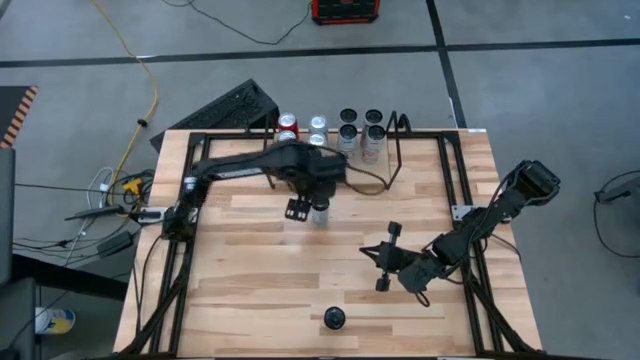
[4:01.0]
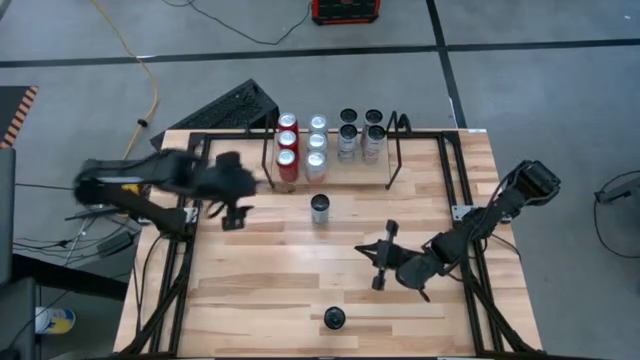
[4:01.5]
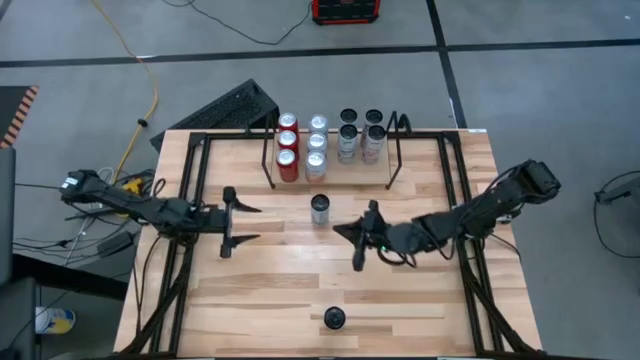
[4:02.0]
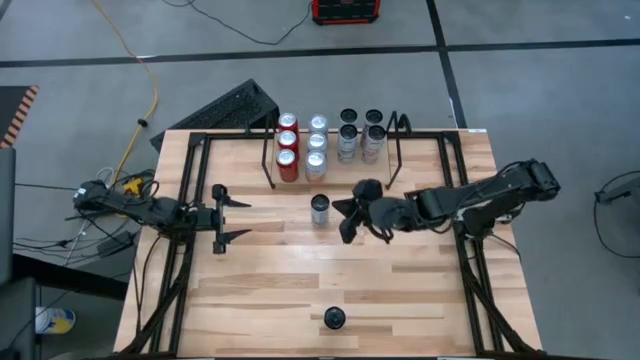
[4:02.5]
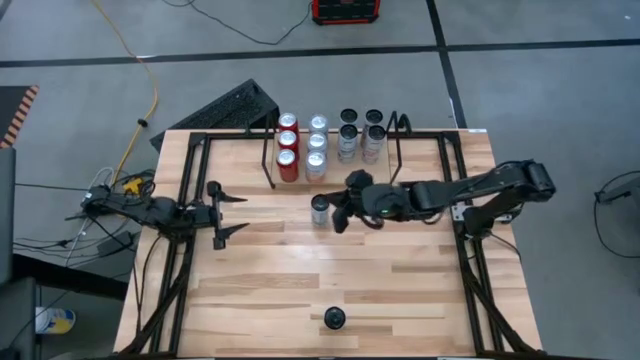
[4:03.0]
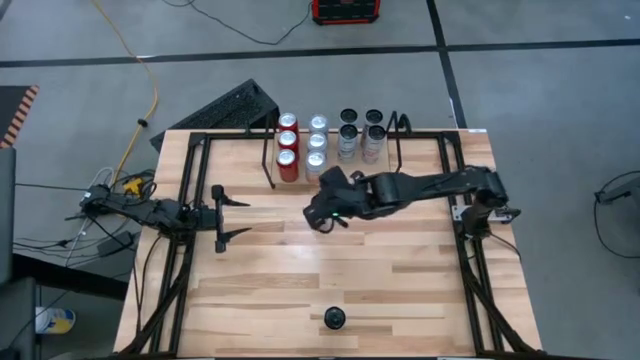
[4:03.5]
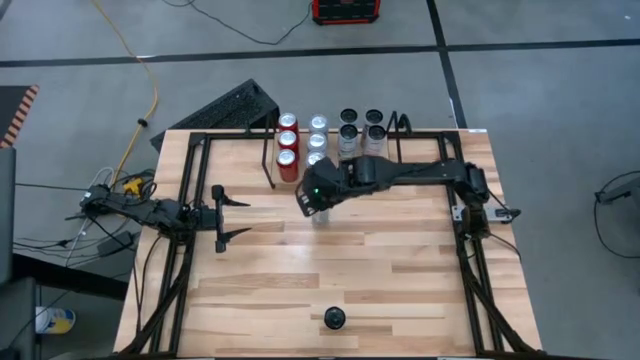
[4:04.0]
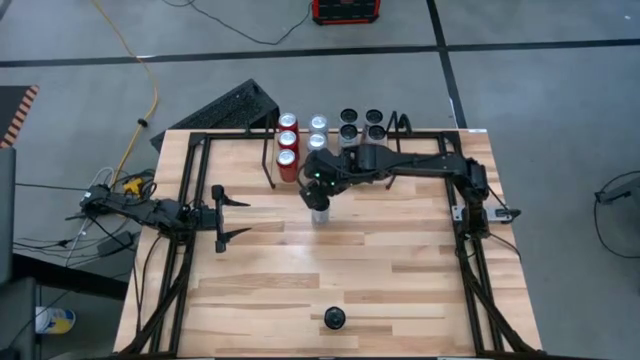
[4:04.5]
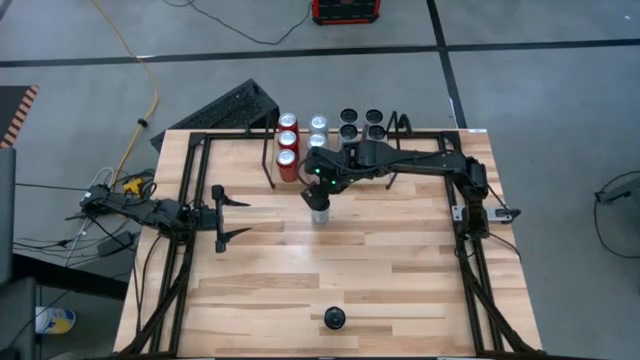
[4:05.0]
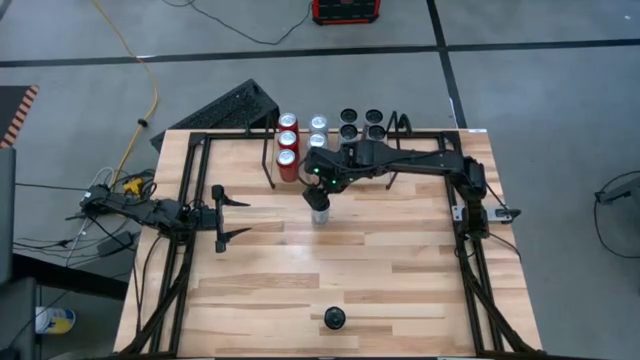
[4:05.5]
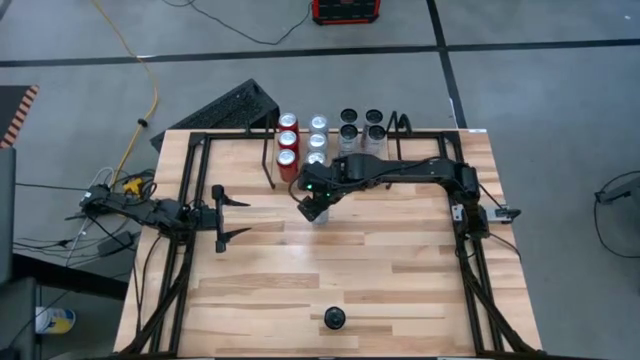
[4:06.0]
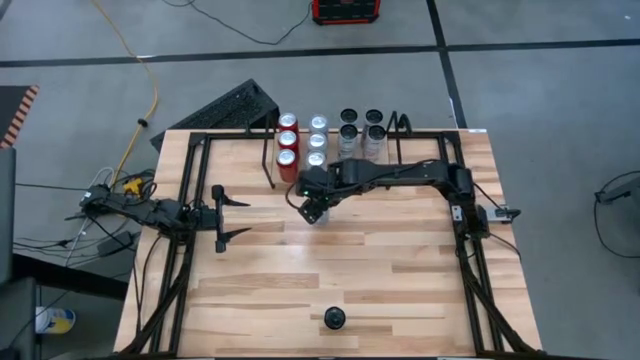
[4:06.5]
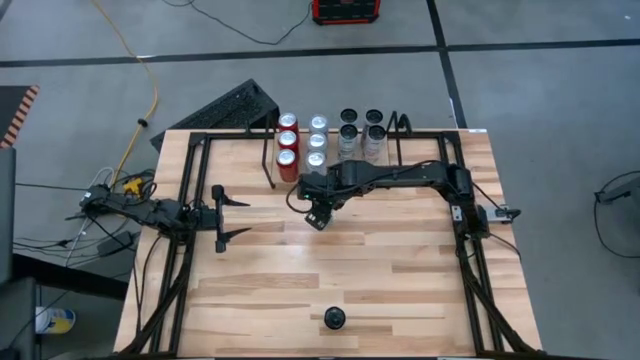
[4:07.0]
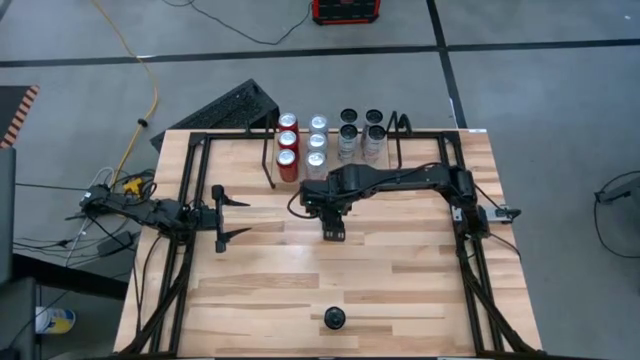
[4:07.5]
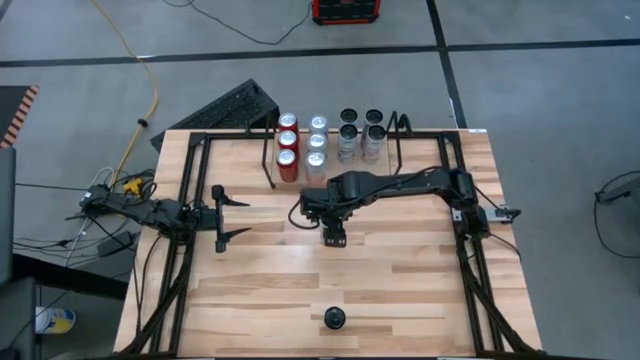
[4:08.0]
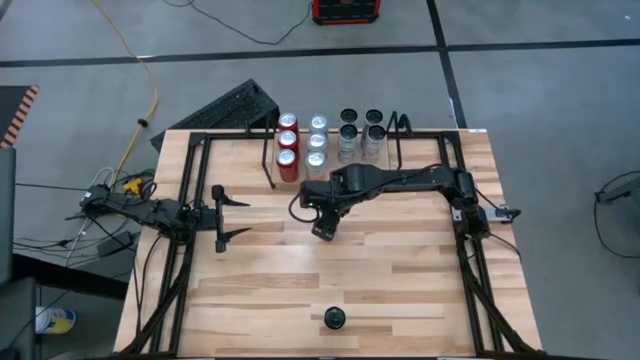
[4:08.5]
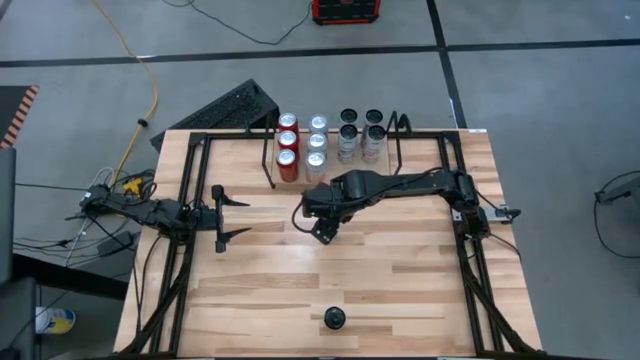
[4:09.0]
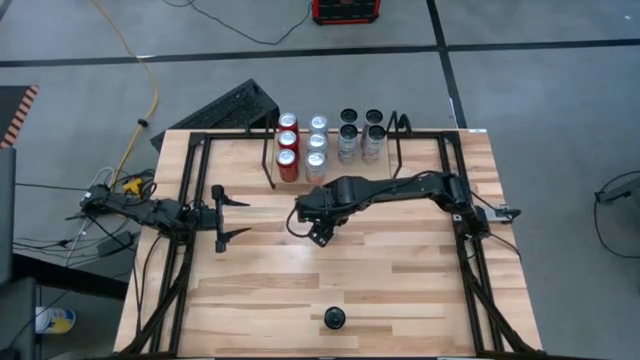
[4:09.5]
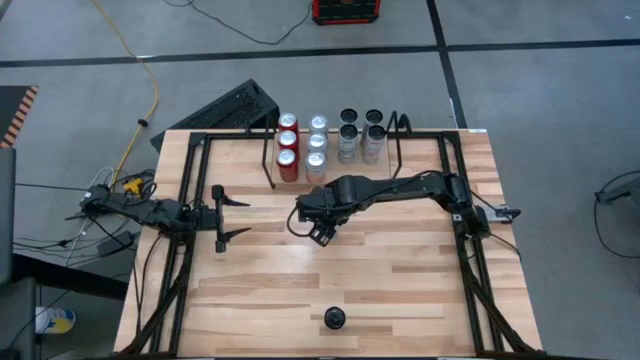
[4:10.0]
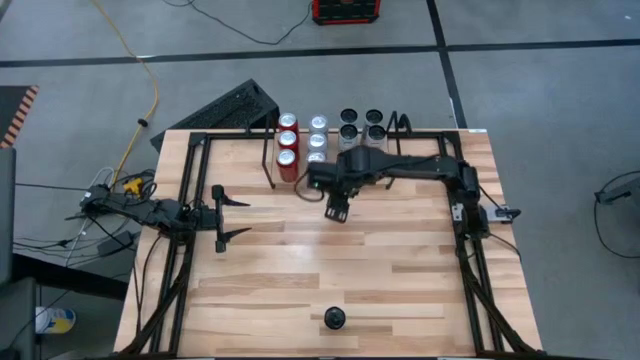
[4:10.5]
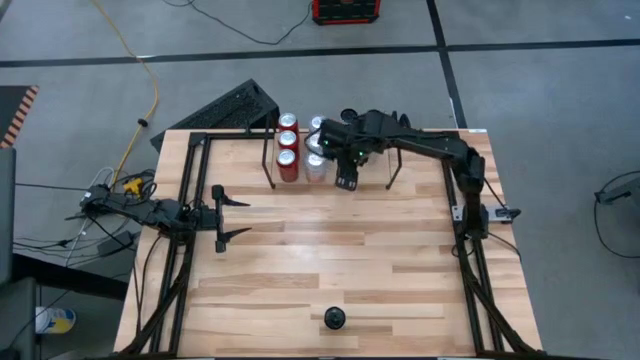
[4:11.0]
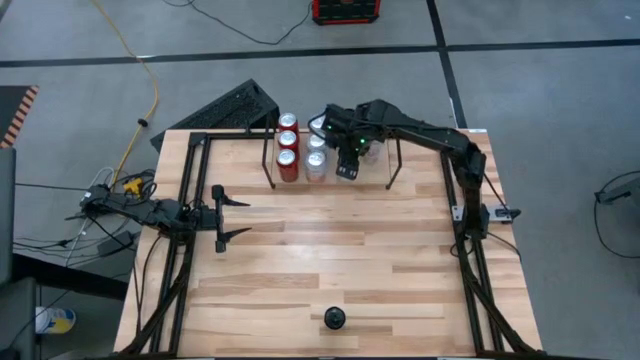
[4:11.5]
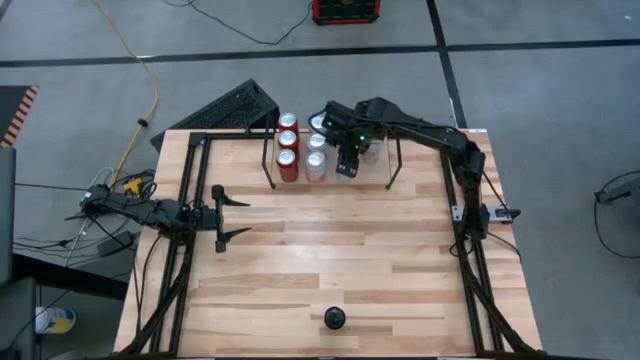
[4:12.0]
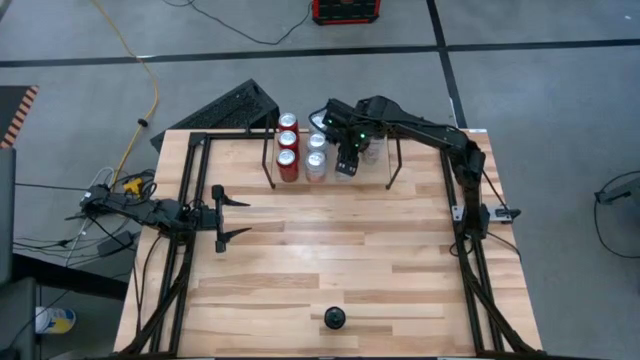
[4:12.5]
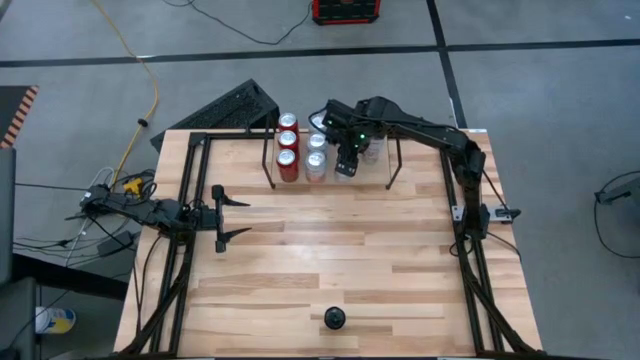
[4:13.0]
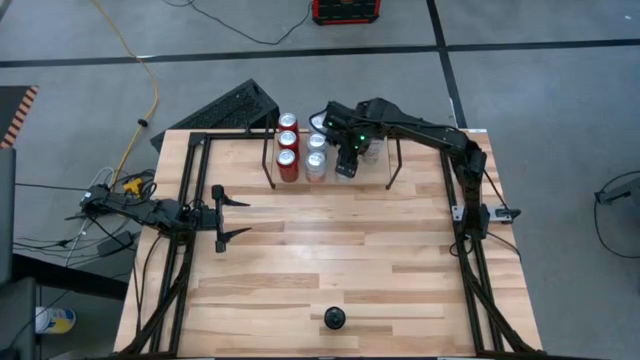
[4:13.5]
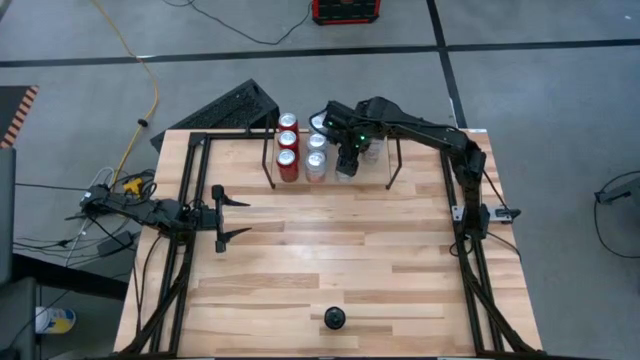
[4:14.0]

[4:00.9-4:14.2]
Task: Place canned beverage on shelf
Put the white blue soda can on the shelf and align with other white blue soda cans

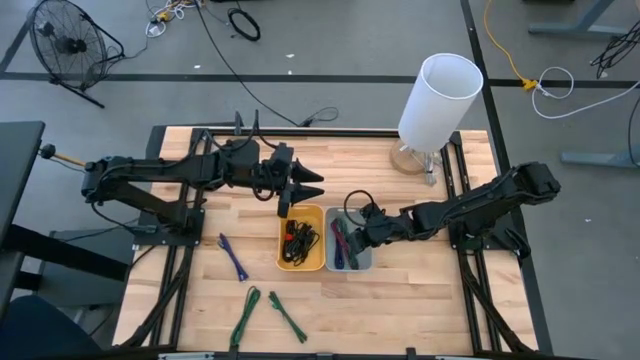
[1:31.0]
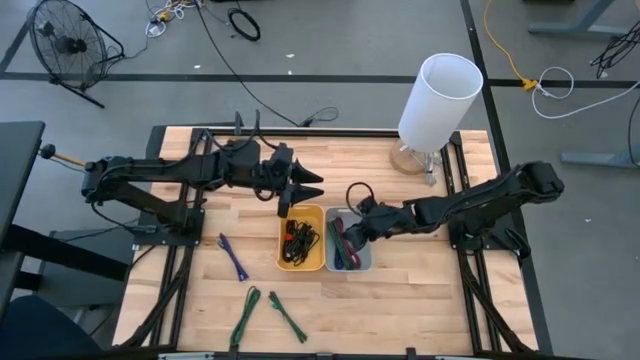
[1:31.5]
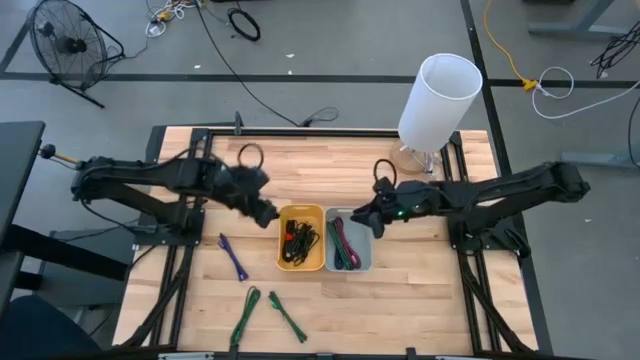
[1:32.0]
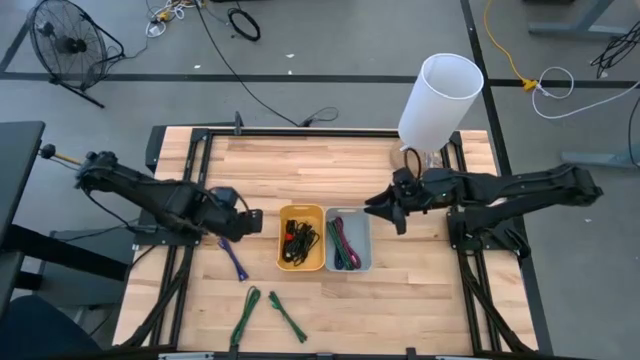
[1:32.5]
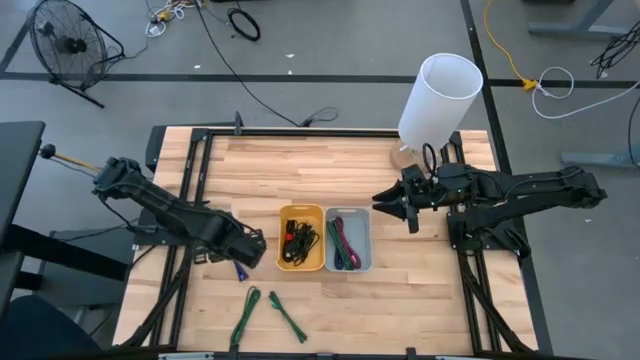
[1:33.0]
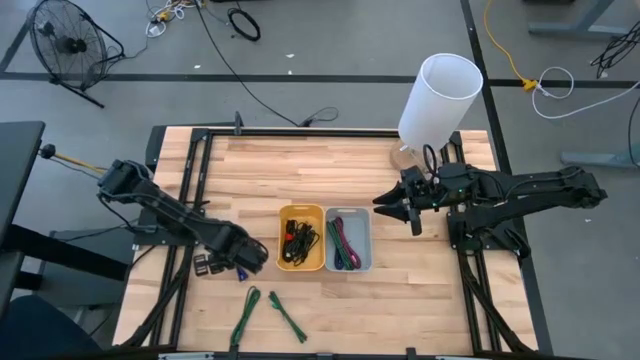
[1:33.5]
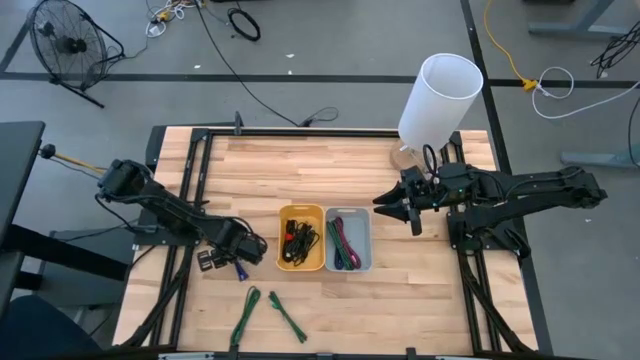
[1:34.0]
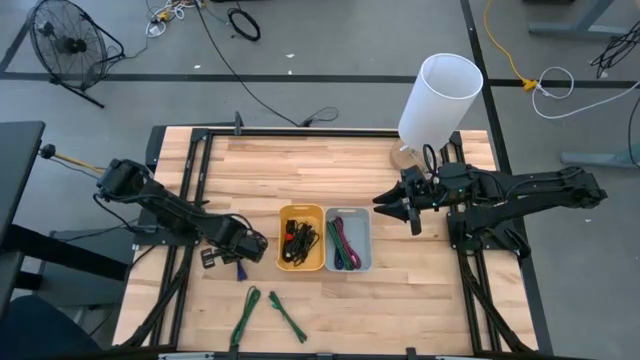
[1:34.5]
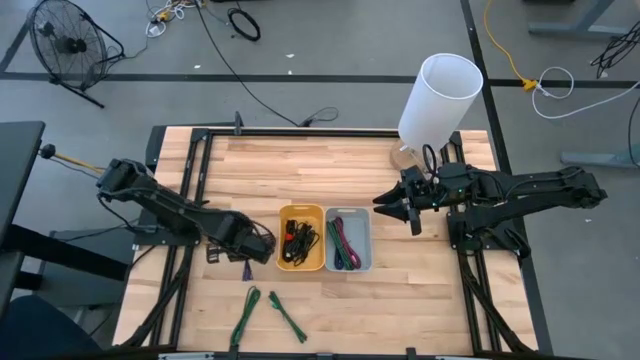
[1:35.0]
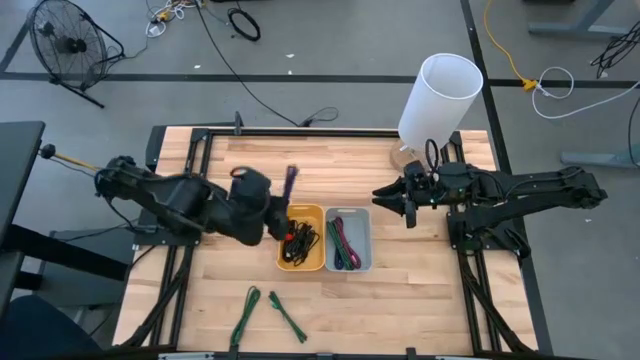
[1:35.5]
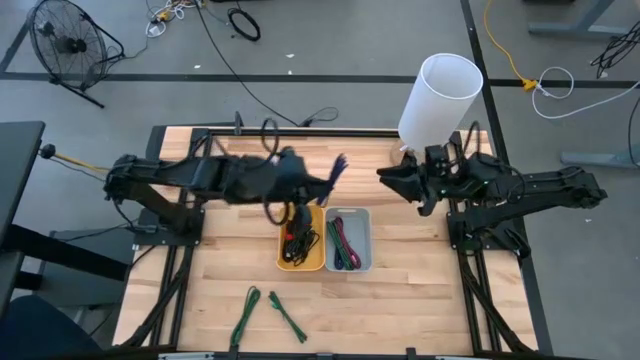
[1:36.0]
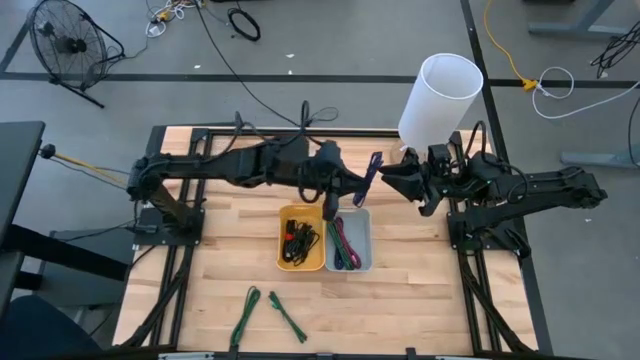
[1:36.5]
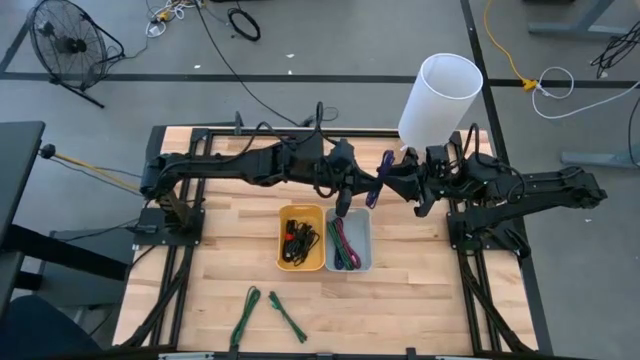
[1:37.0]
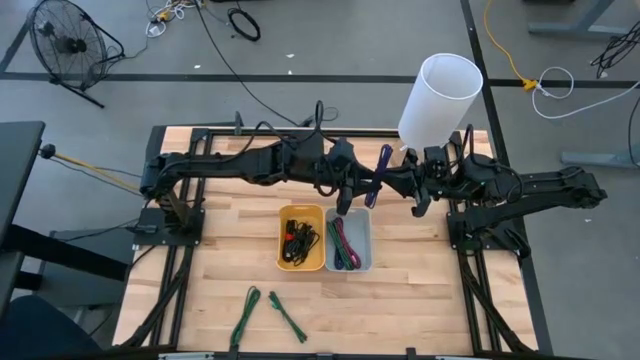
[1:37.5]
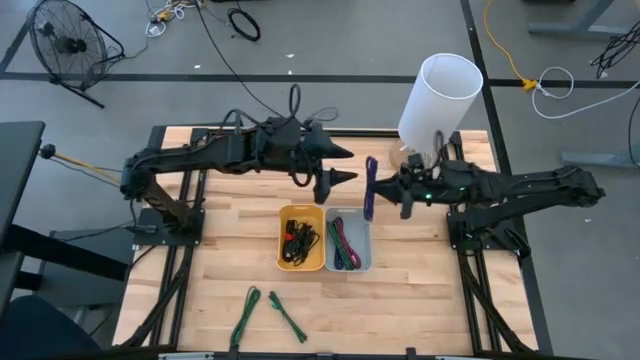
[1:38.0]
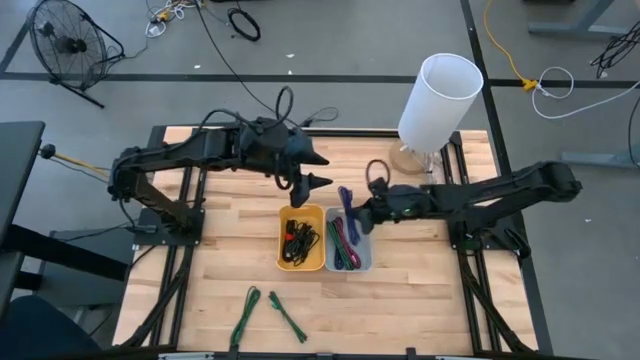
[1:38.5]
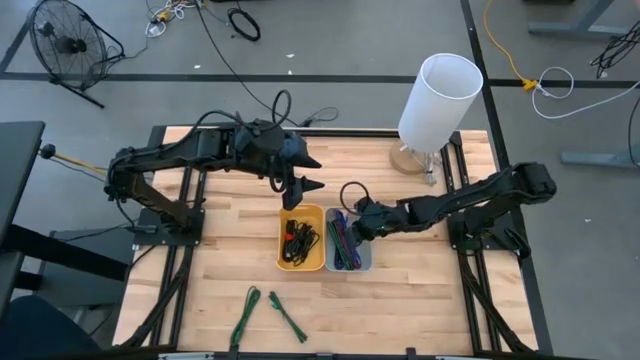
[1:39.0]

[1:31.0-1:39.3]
Task: Pick & Place USB Port
Put the black violet charger cable into the gray bin

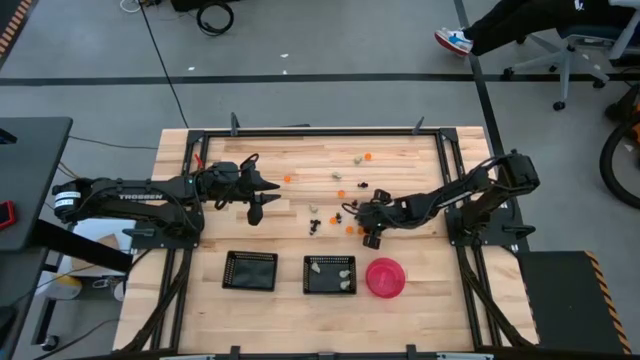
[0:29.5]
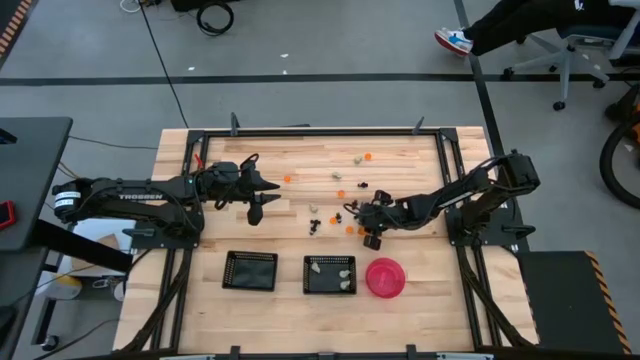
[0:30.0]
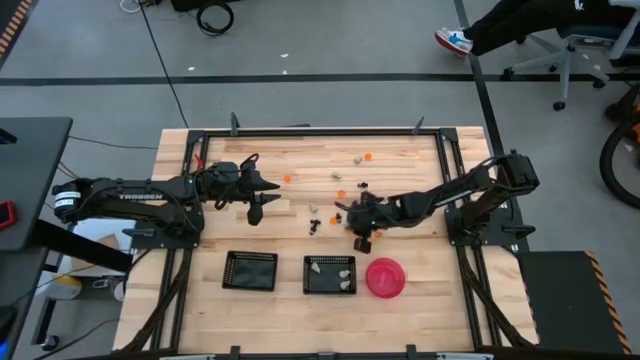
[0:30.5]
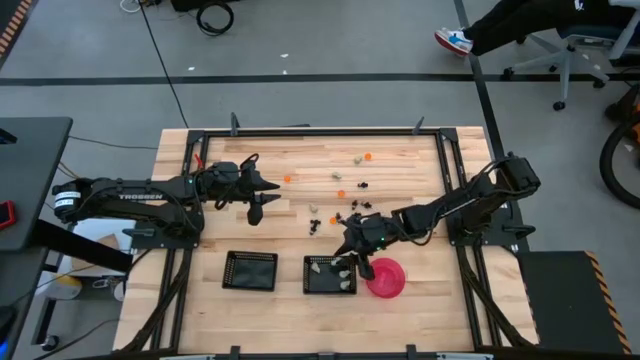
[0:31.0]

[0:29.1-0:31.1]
Task: Sort Halloween decoration
Put the white skull toy into the right black bin
